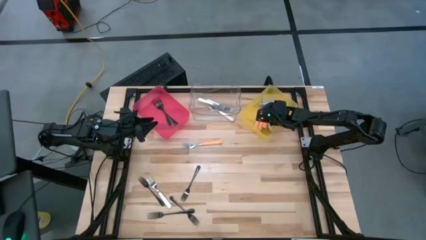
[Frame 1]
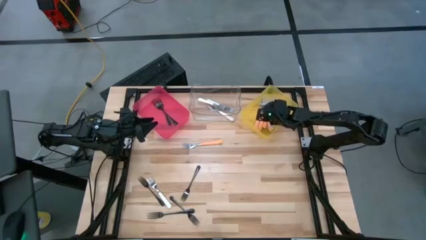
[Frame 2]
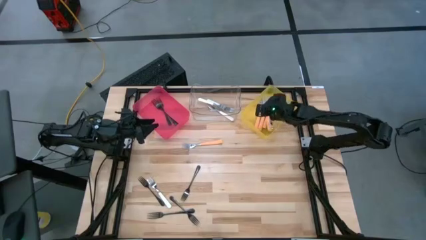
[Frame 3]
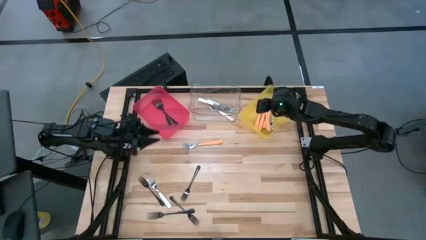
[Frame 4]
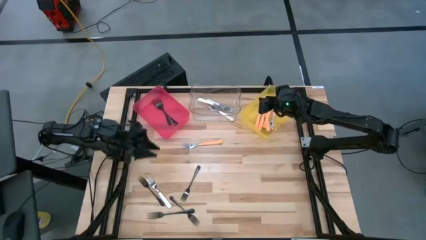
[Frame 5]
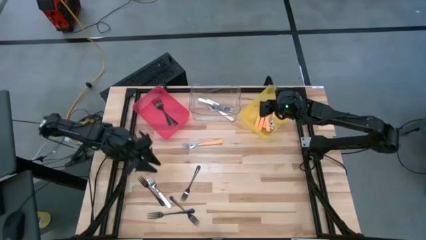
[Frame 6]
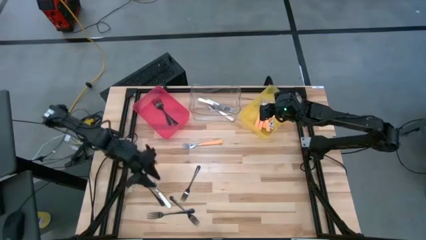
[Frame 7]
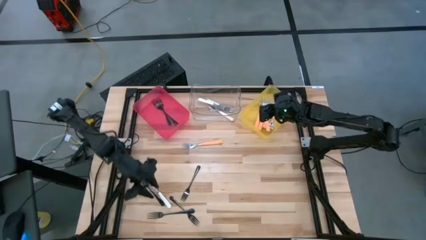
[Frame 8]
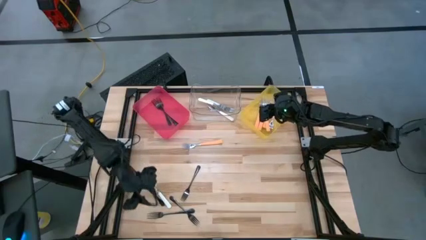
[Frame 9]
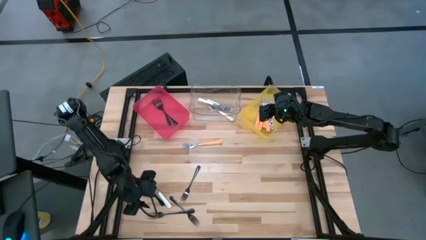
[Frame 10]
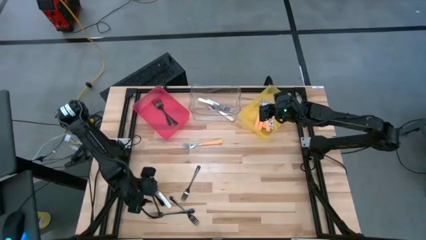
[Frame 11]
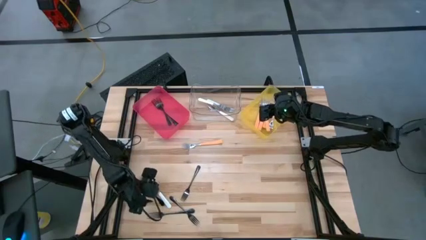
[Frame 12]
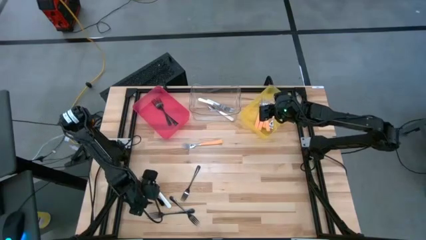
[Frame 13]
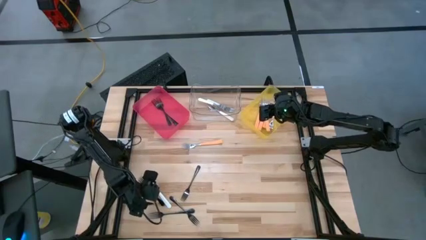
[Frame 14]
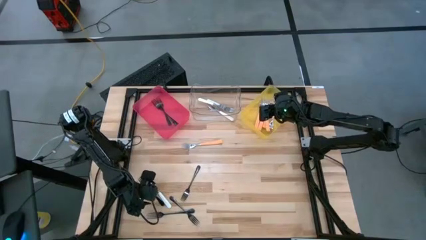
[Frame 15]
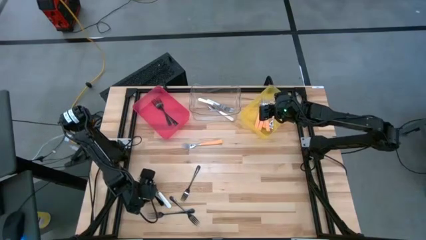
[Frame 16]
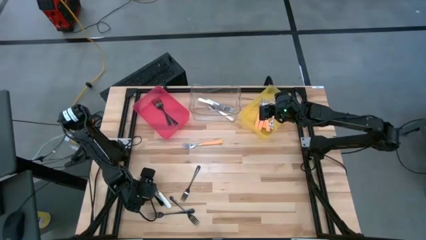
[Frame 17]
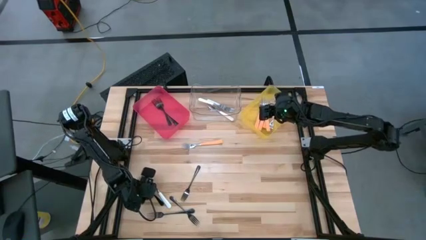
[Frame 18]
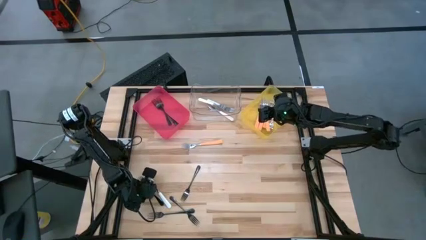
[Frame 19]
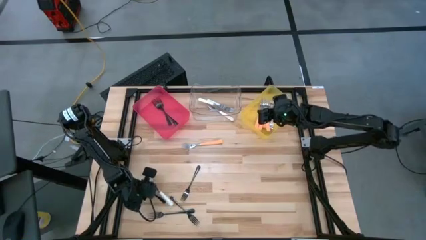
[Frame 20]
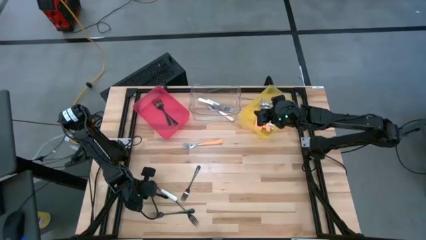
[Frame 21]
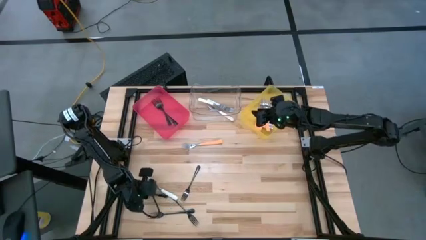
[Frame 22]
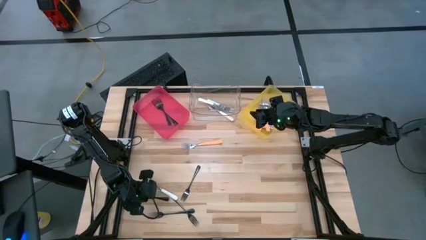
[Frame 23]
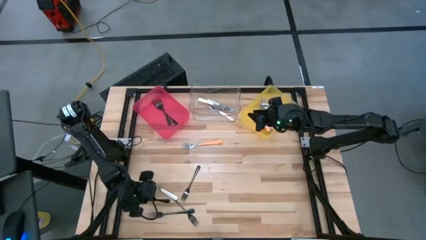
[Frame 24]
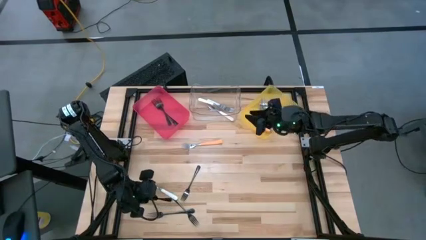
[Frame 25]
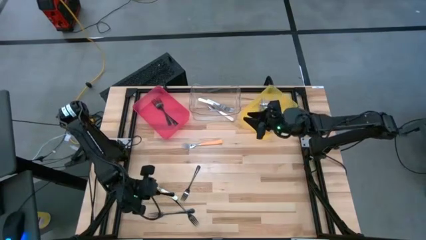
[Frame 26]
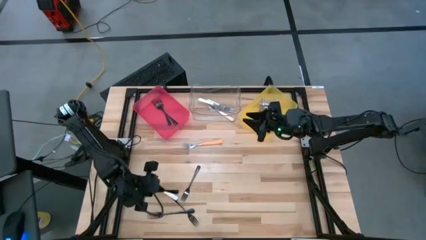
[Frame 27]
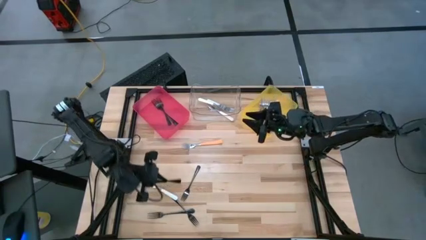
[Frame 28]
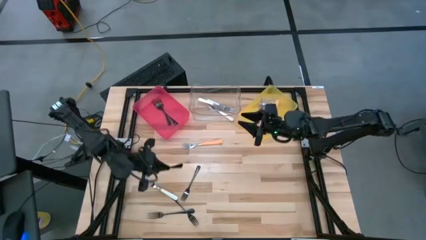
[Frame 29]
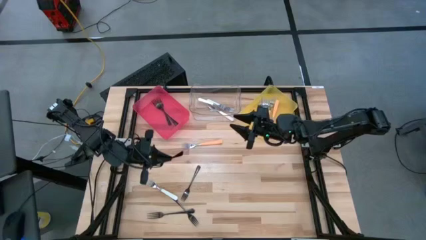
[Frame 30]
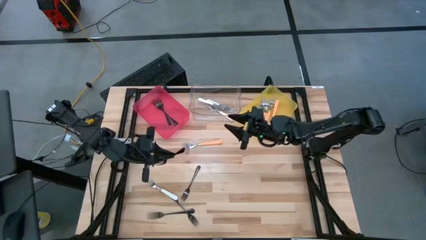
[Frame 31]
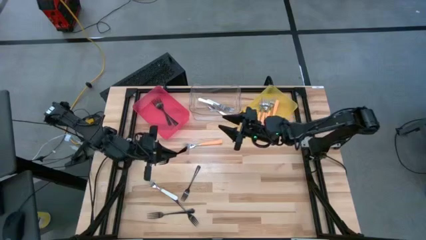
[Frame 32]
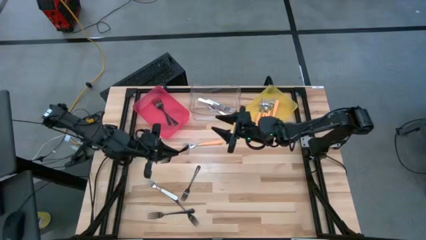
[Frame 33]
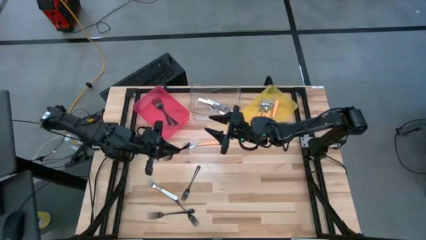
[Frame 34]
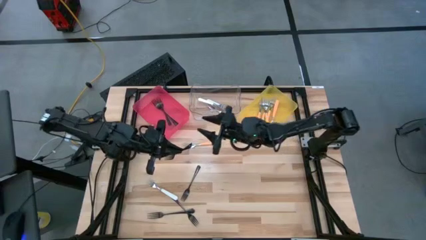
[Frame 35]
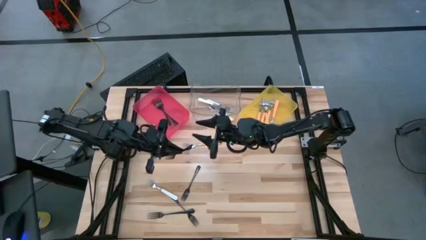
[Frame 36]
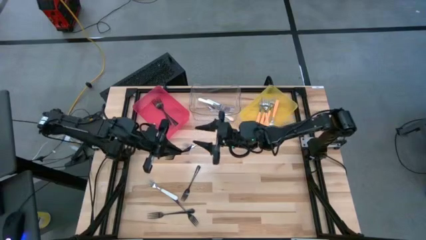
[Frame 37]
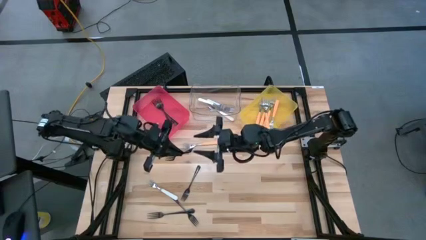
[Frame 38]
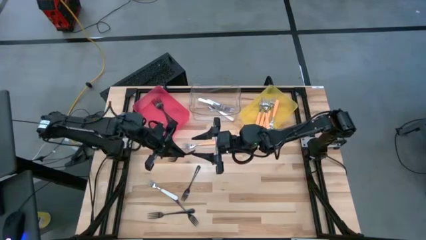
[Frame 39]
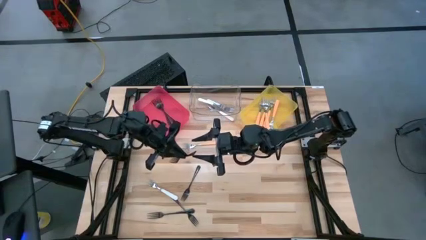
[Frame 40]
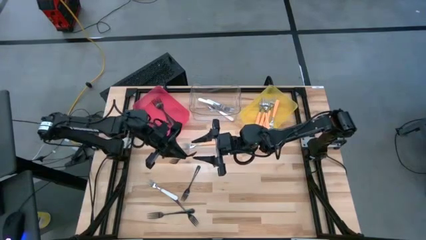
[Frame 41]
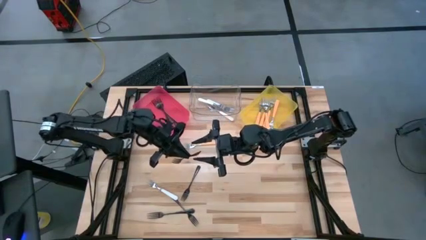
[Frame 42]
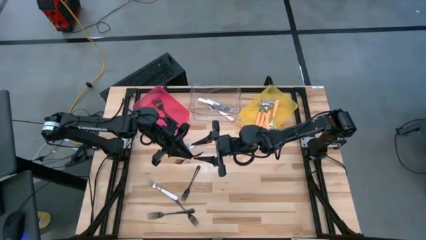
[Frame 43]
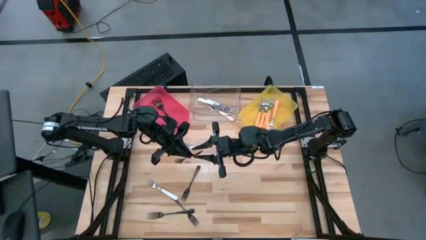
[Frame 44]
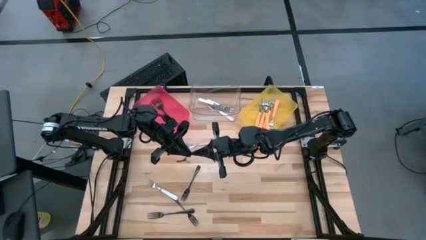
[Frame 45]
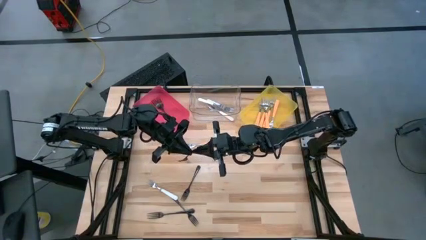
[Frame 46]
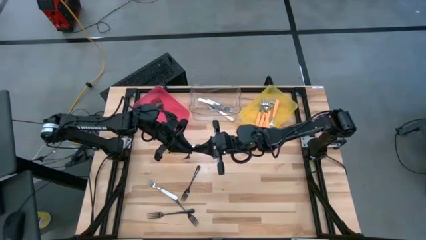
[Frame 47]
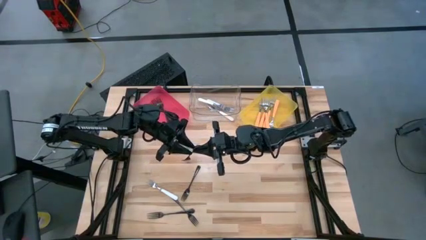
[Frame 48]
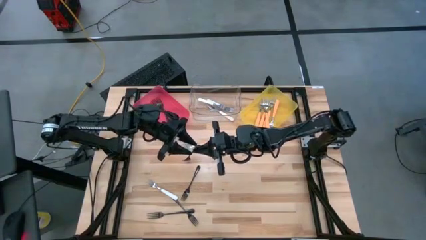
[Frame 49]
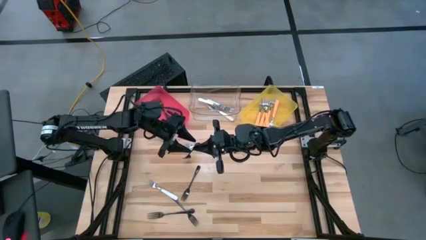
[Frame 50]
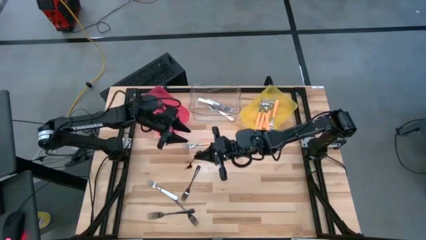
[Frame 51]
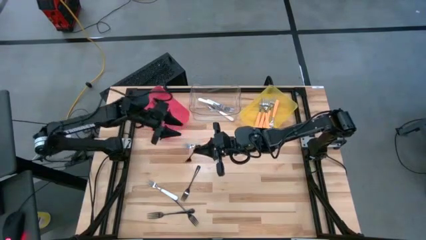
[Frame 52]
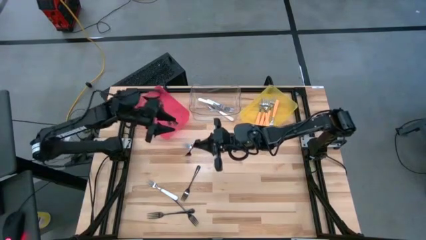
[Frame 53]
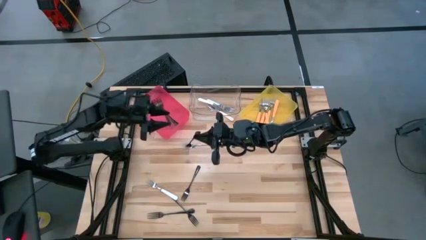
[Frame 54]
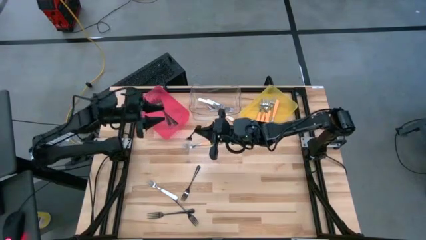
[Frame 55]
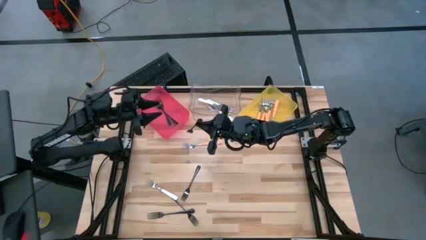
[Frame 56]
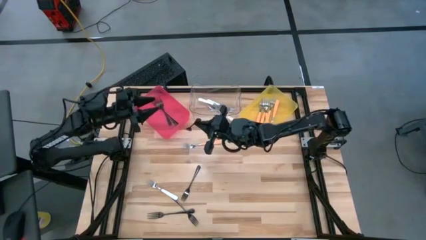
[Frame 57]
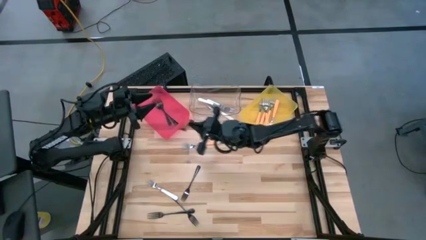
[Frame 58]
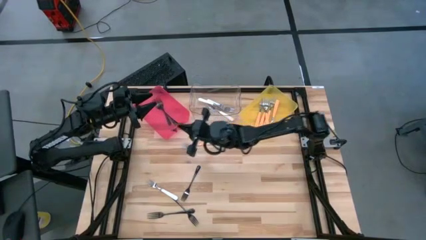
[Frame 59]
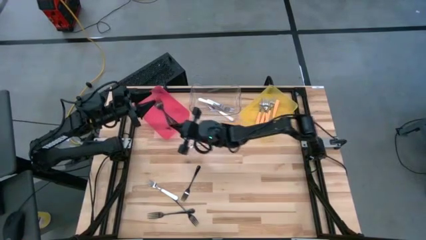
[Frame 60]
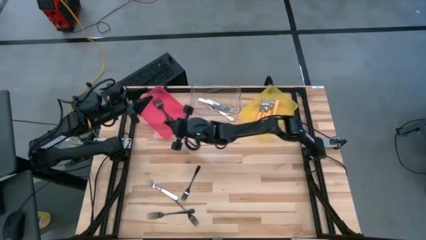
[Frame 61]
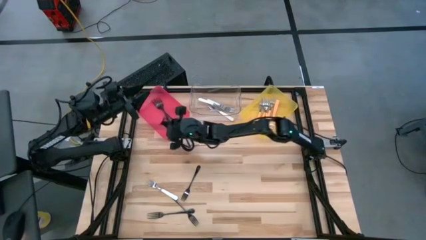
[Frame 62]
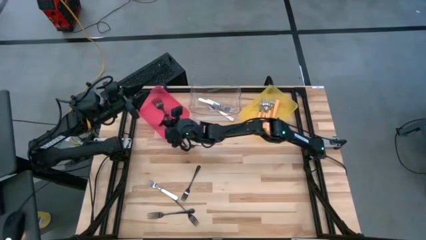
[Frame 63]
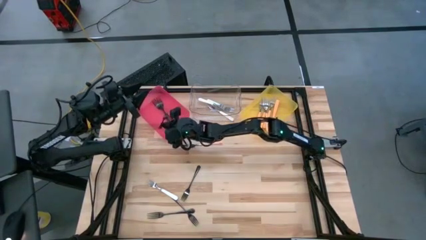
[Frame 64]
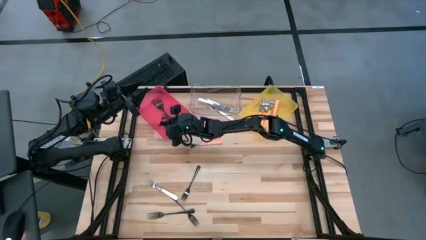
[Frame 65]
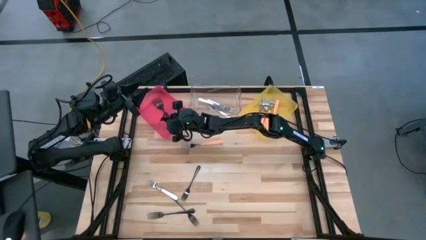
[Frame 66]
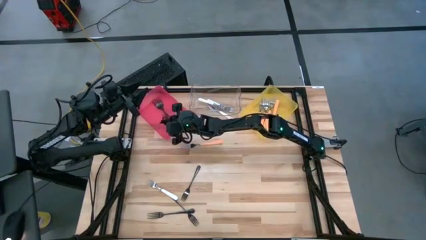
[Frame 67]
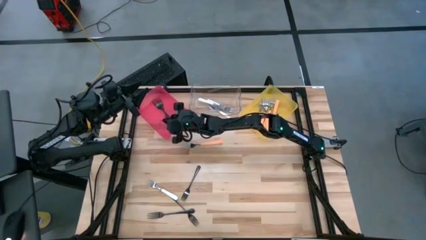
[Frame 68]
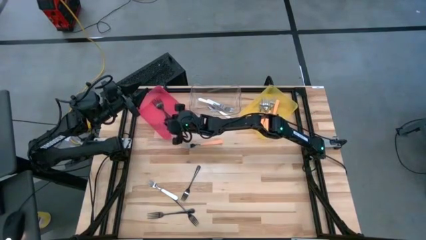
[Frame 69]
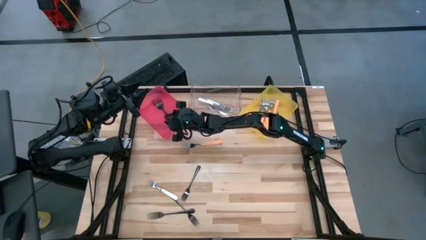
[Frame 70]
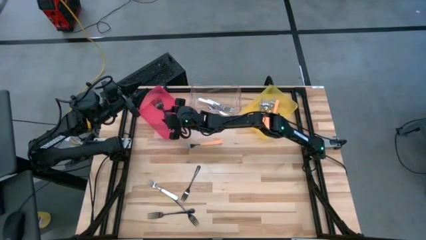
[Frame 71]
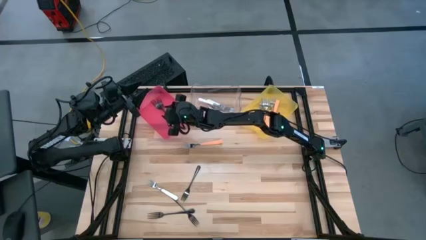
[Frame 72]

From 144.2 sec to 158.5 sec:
Task: Sort silverware by color (type)
Put the black fork into the pink bin
